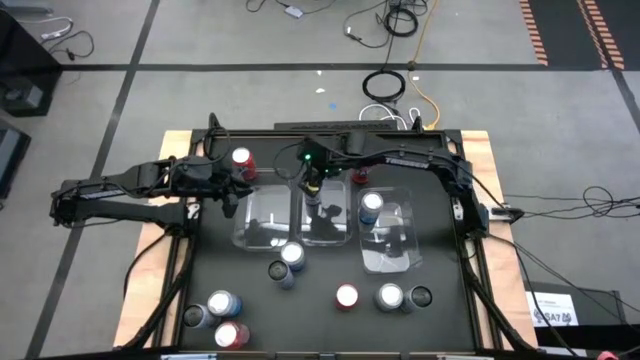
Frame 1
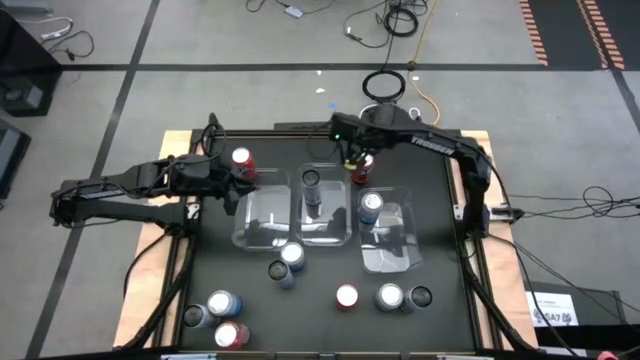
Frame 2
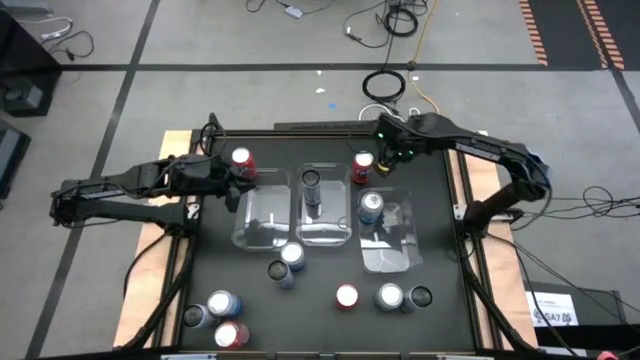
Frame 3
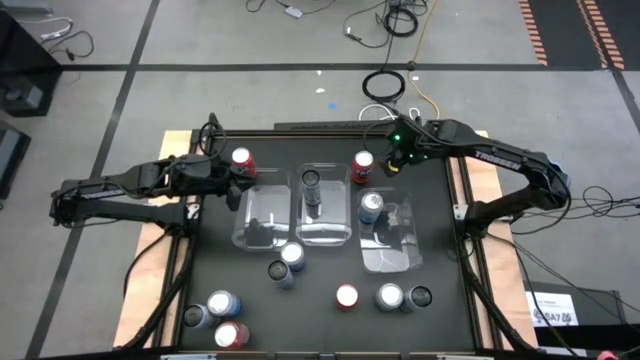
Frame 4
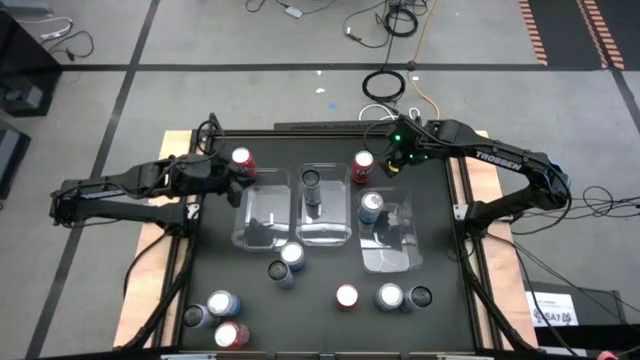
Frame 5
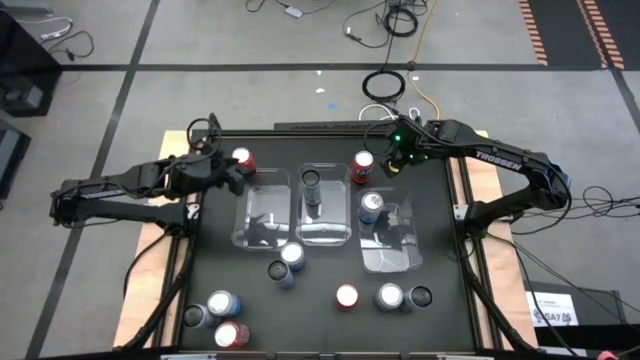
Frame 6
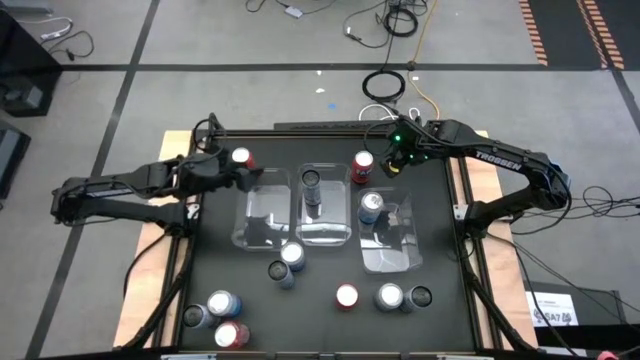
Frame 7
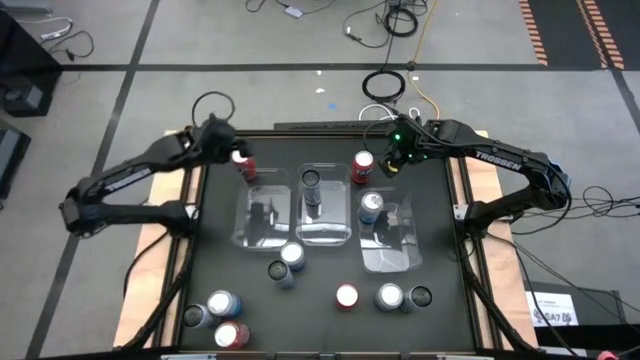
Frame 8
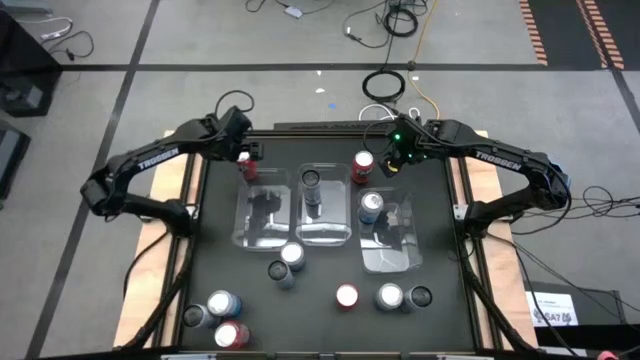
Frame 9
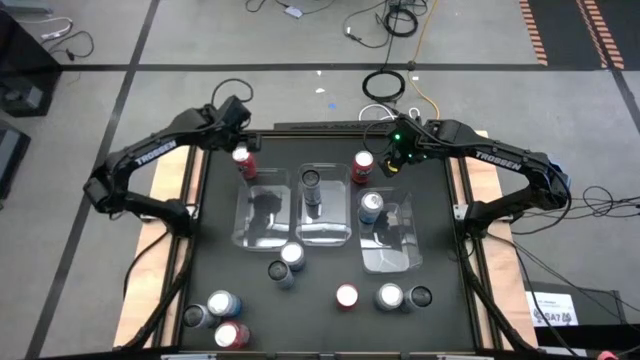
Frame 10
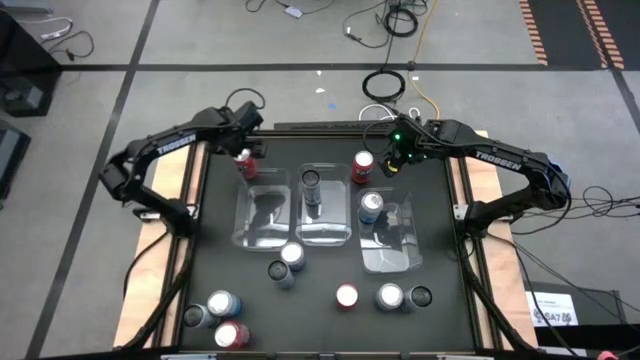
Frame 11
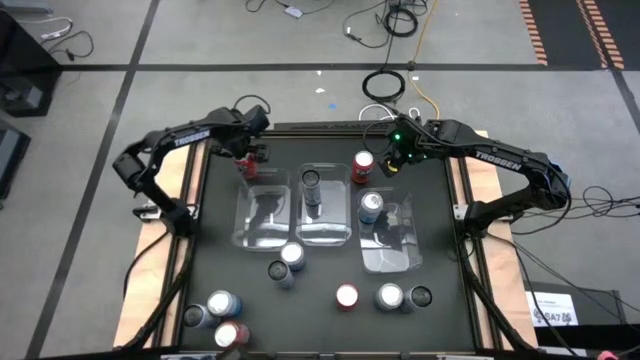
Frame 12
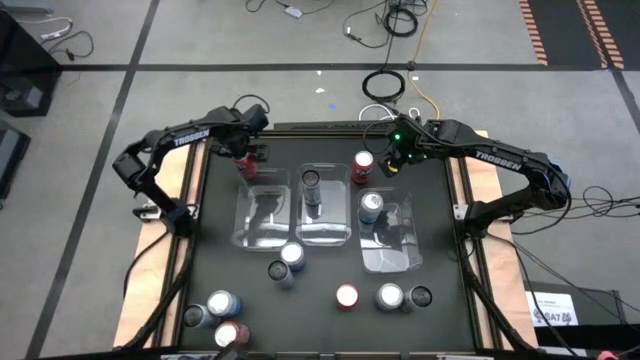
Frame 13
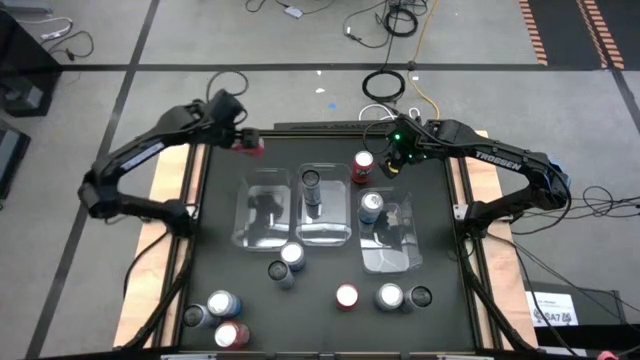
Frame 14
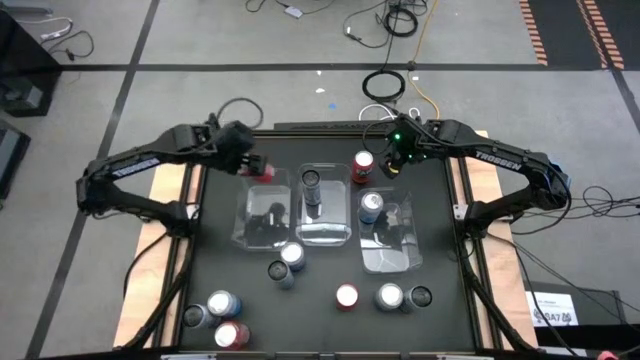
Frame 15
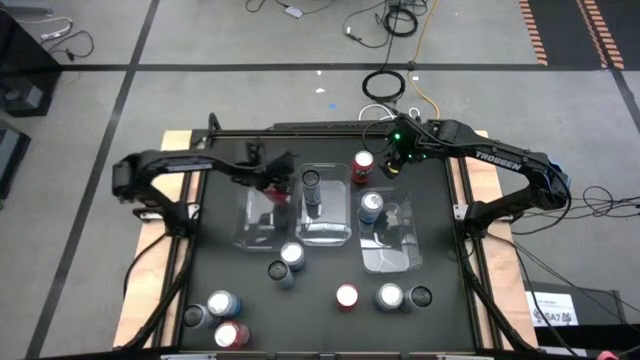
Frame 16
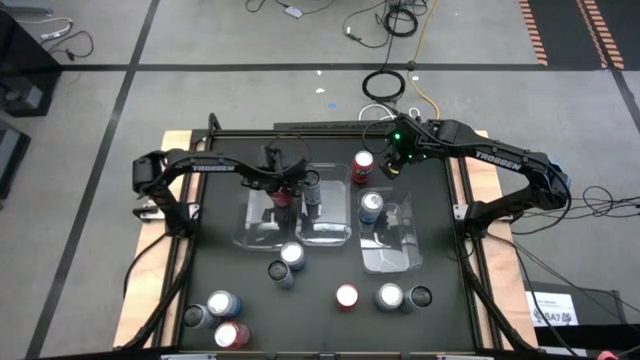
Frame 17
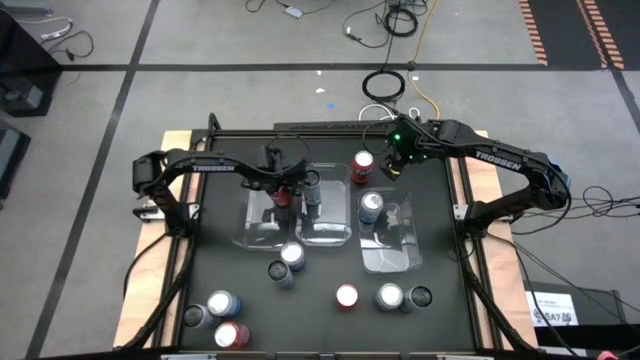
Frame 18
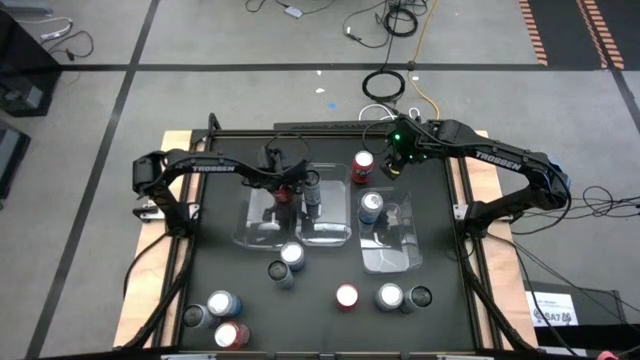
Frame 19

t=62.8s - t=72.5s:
Task: Sort soda cans
Put the red soda can into the top left transparent bin

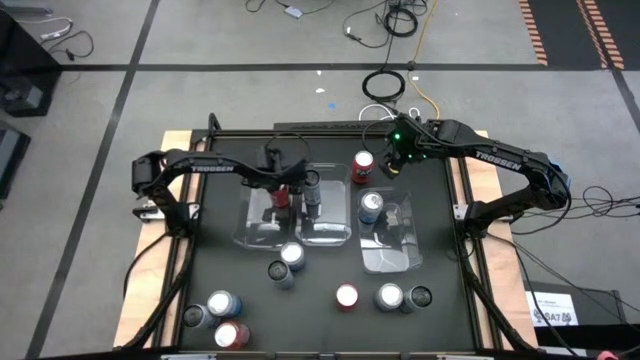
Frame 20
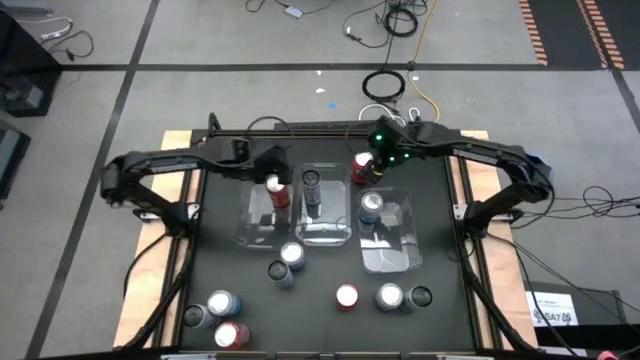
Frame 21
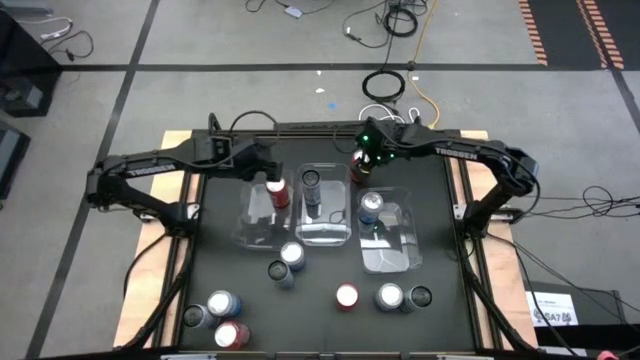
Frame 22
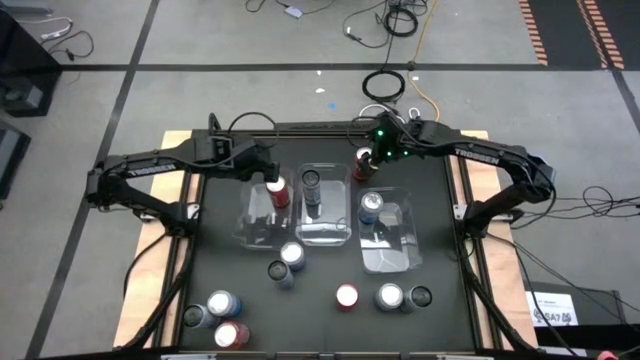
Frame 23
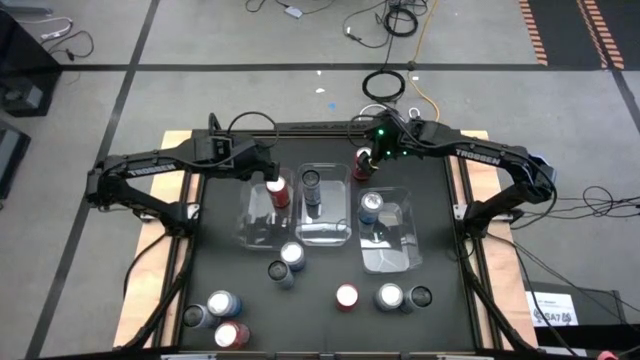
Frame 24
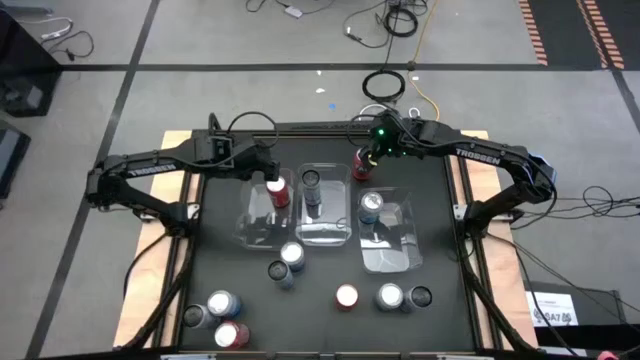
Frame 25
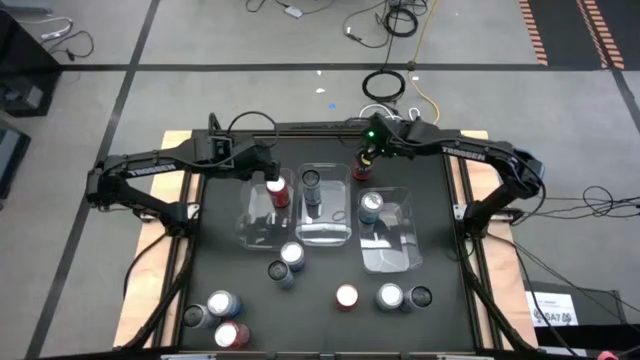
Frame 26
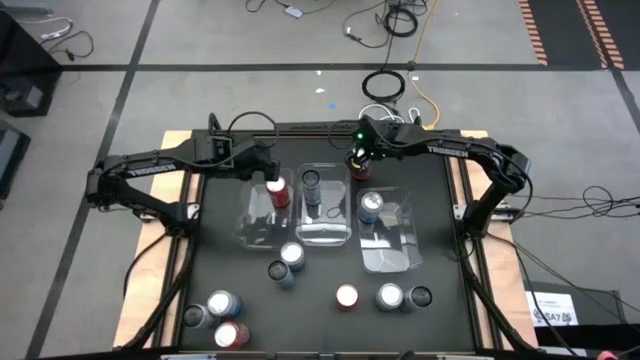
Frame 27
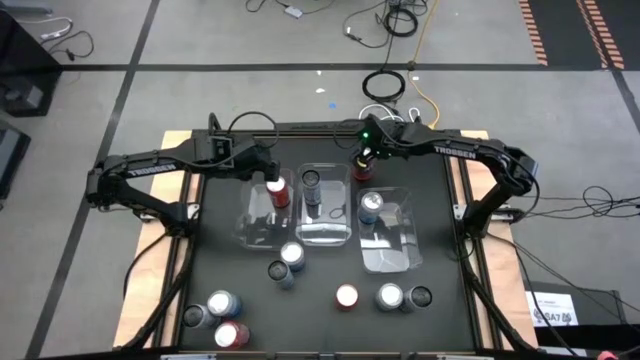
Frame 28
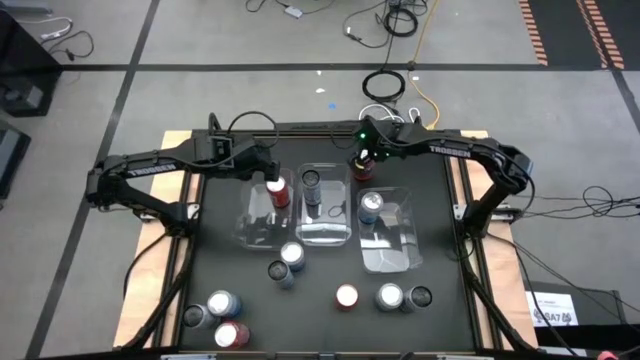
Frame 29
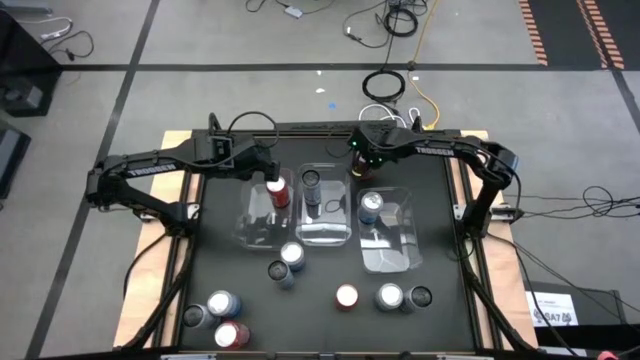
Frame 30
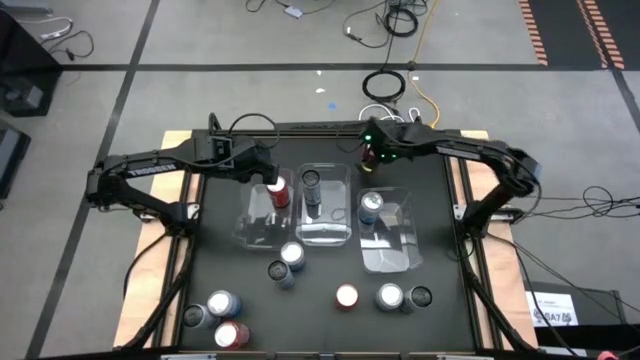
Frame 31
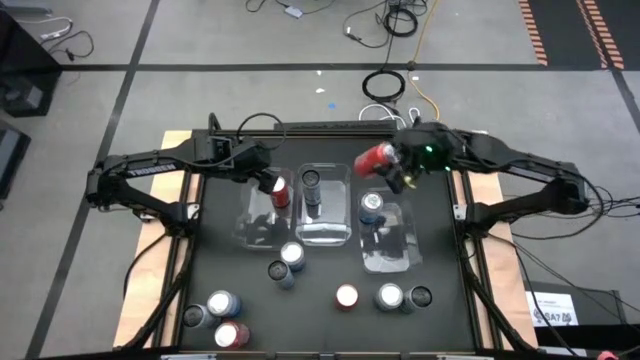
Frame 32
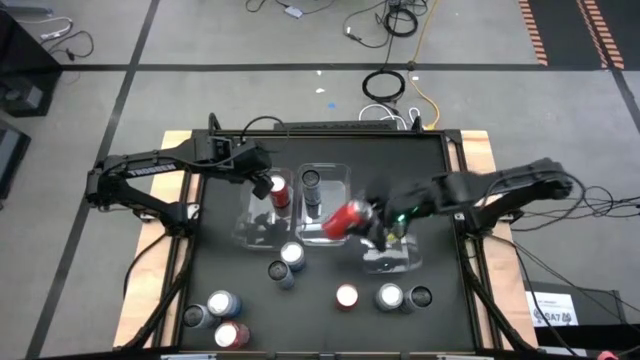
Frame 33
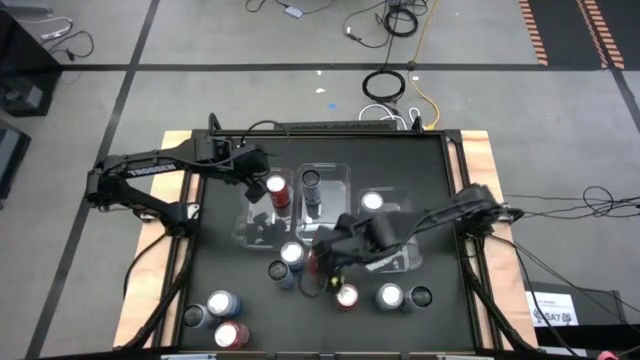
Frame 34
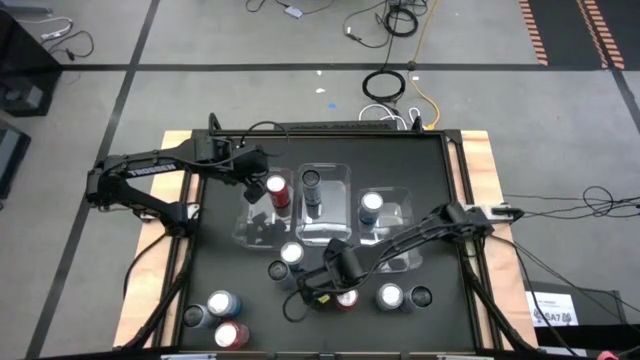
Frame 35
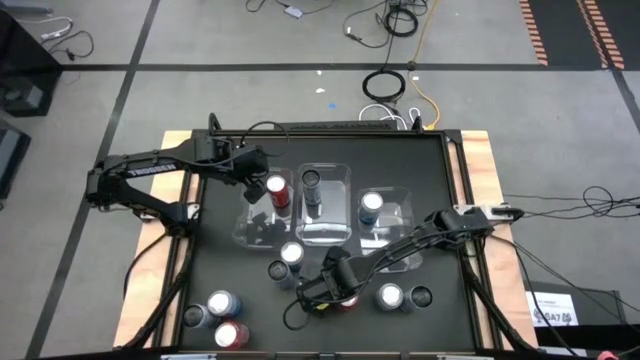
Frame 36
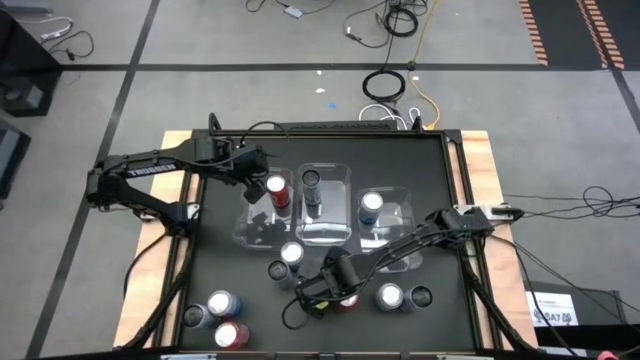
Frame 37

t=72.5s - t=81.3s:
Move the red soda can to the bottom center of the table

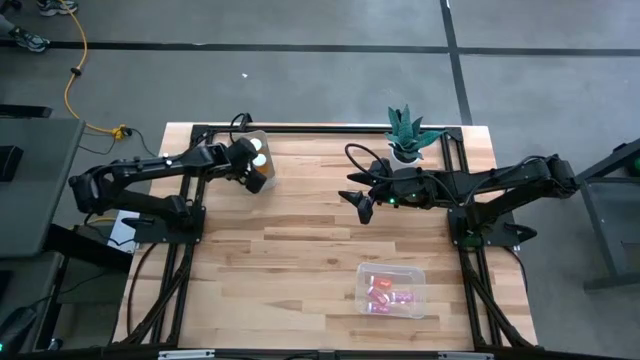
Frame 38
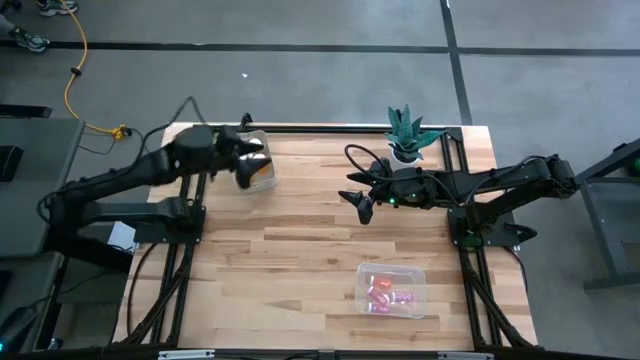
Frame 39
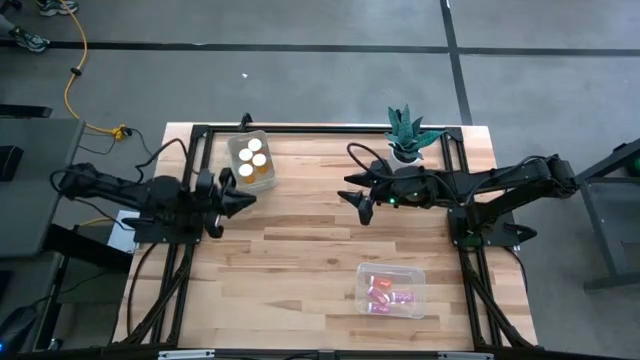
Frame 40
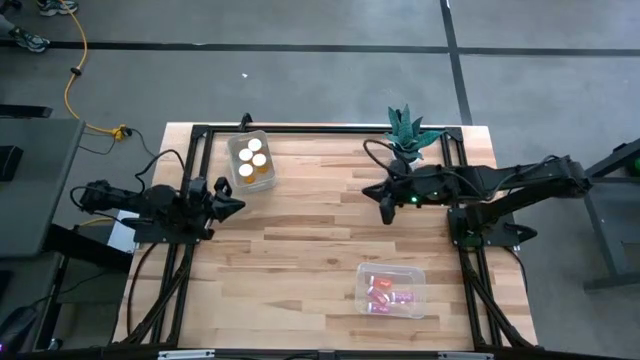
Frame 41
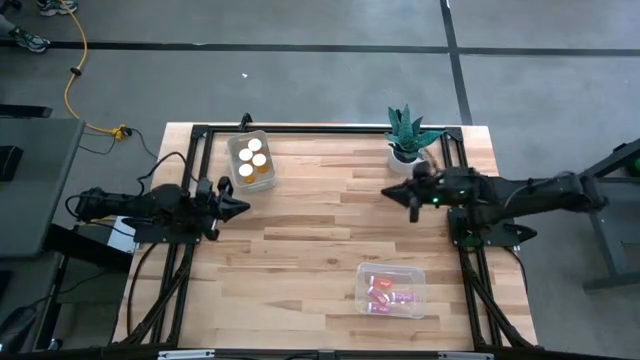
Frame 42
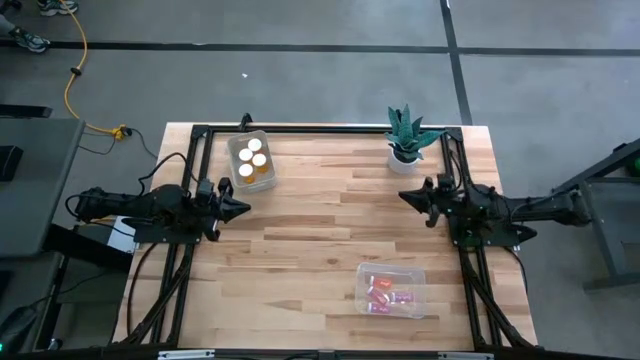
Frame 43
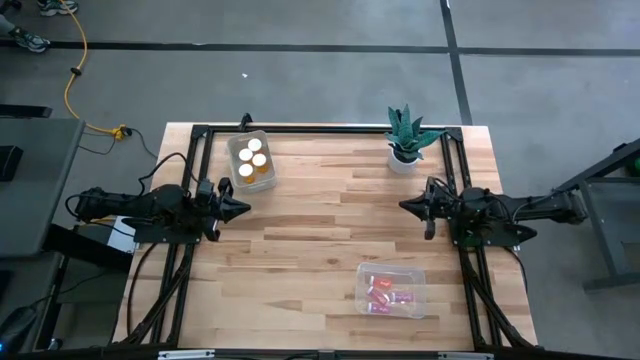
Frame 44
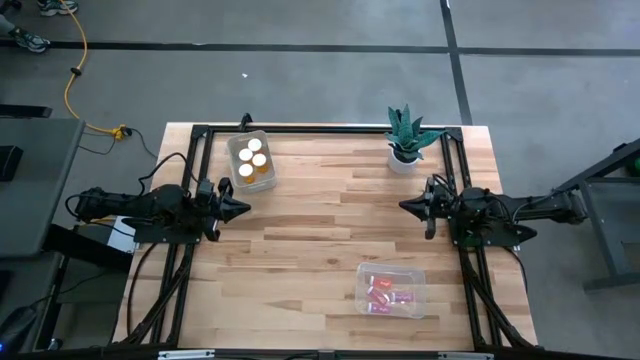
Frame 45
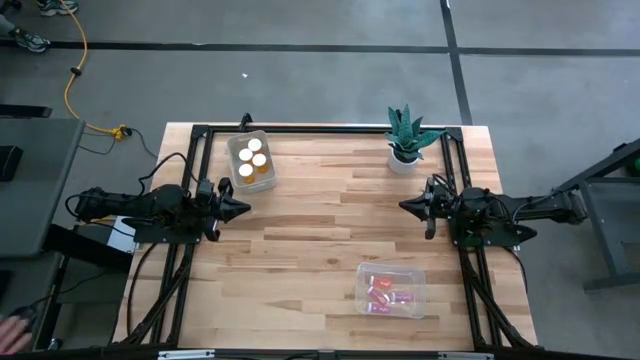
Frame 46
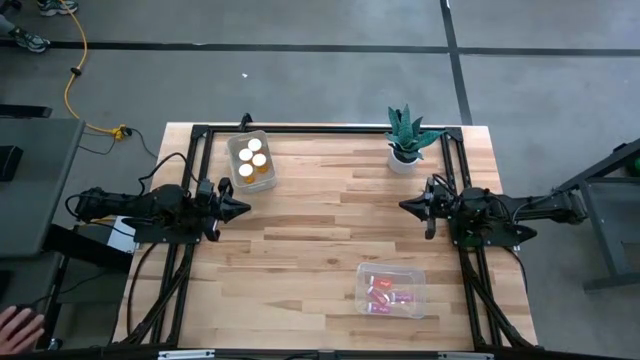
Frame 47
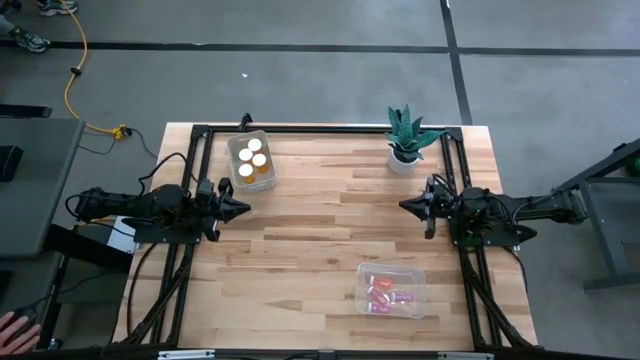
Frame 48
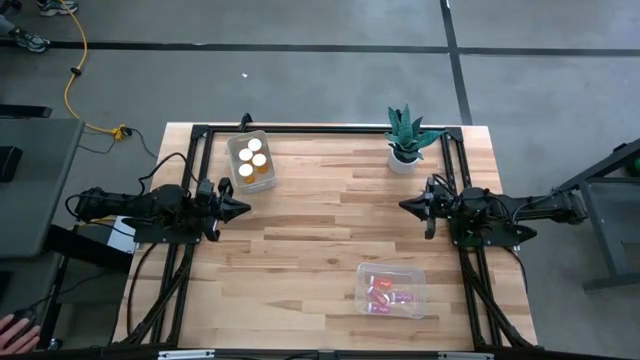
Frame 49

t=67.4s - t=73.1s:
Task: Pick and place medicine bottles into bin by pill shape (circle, oval)
Return to Home Position
